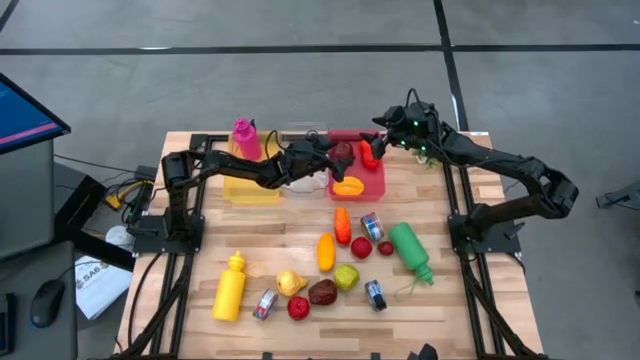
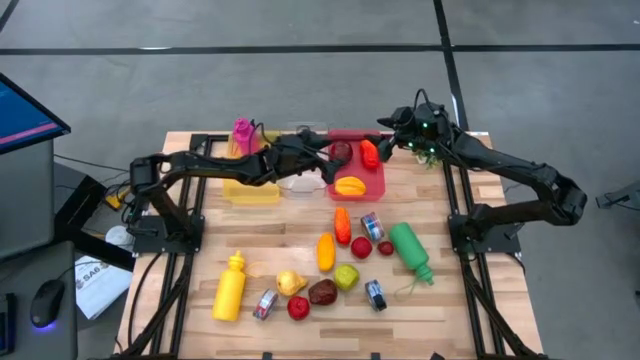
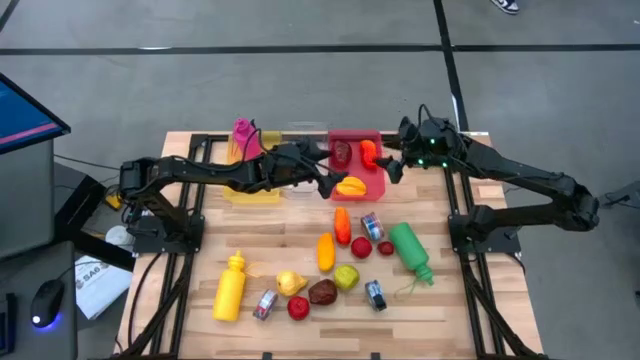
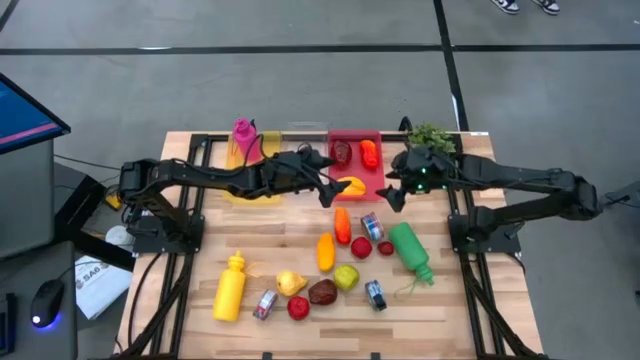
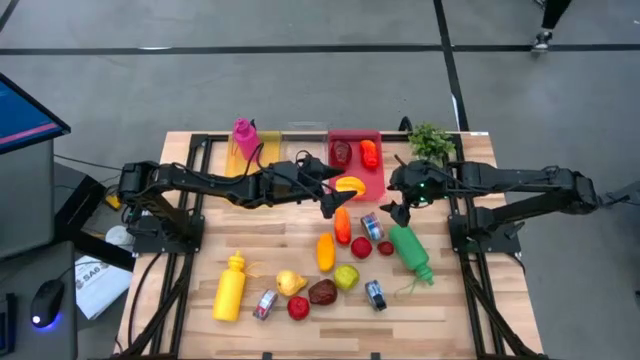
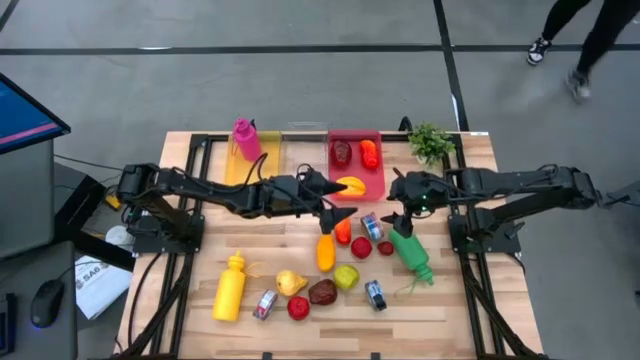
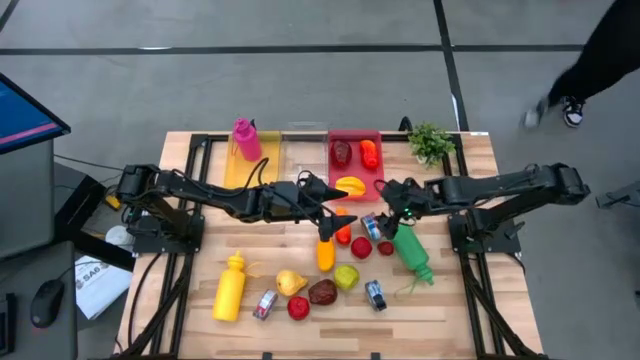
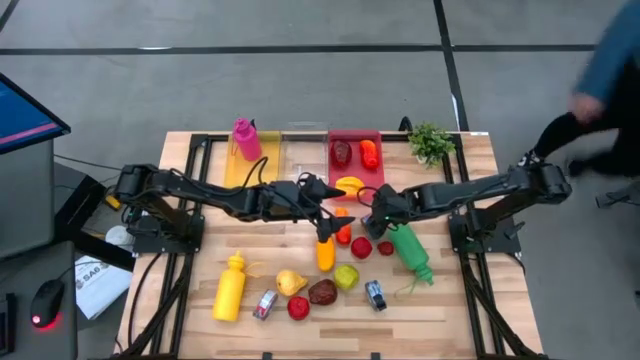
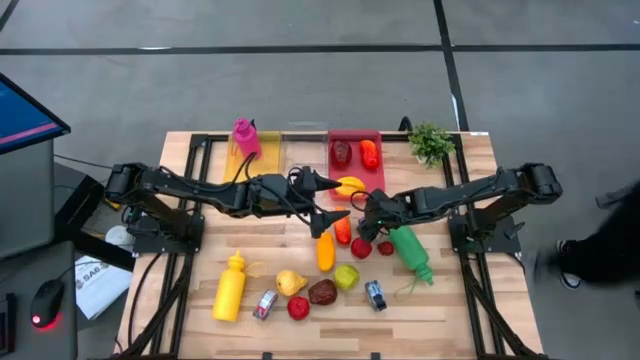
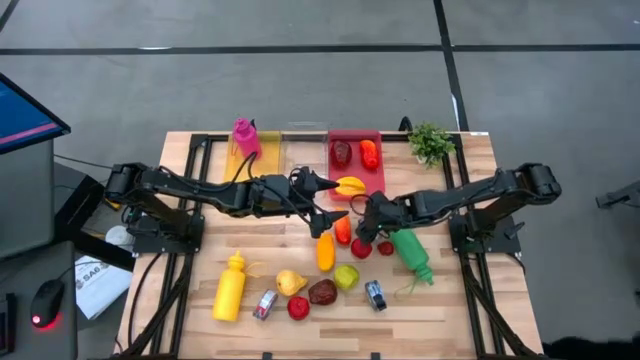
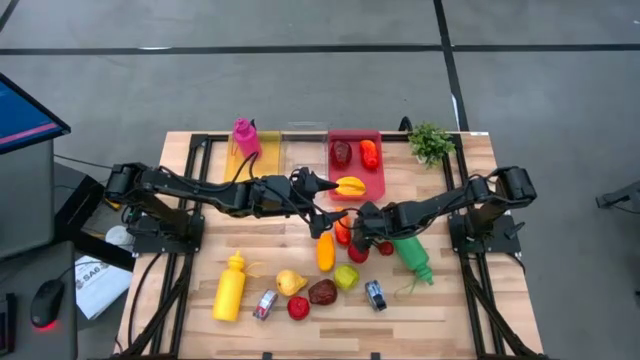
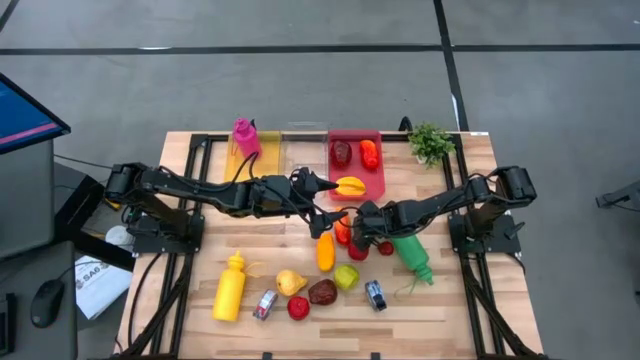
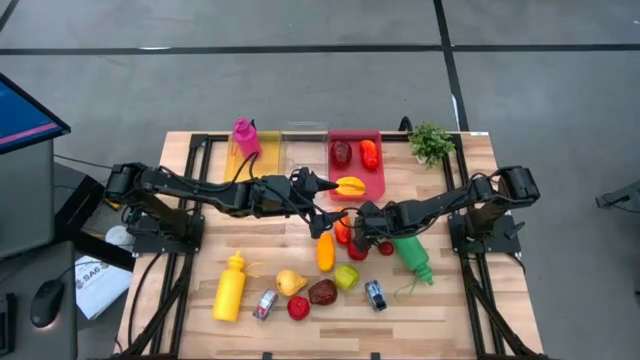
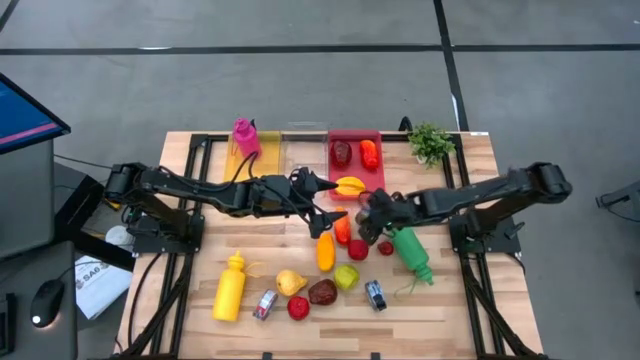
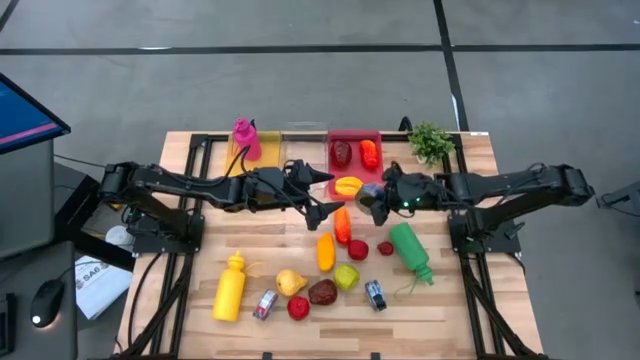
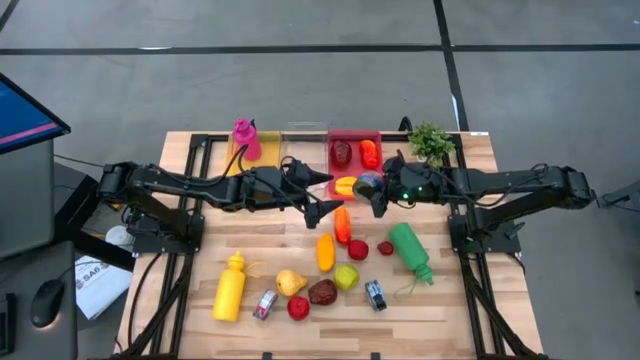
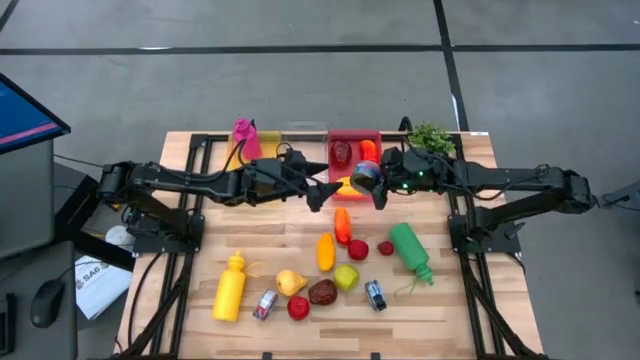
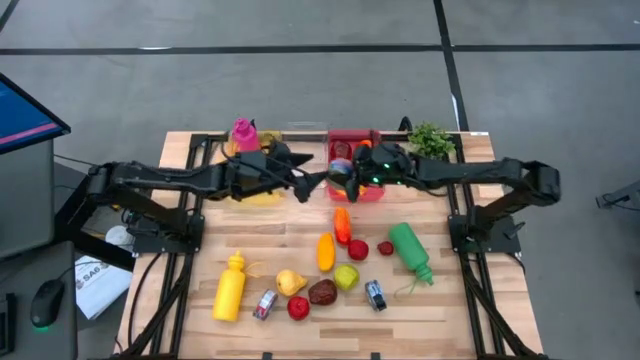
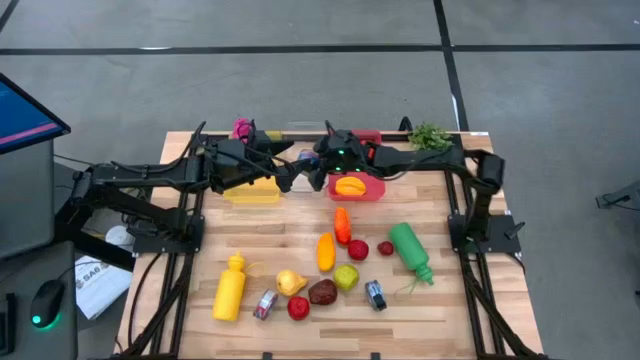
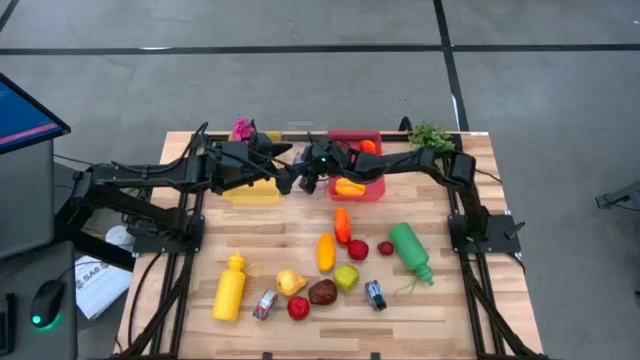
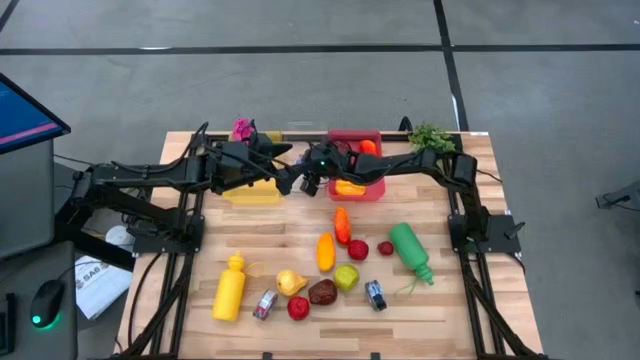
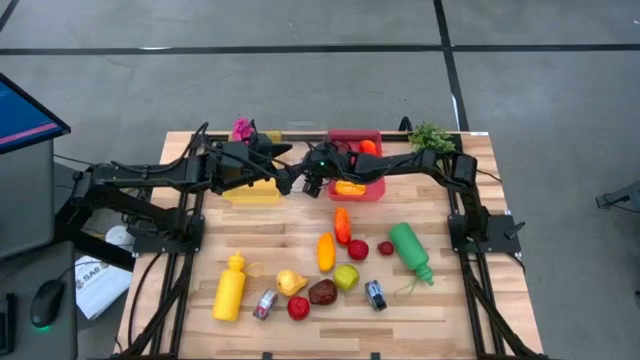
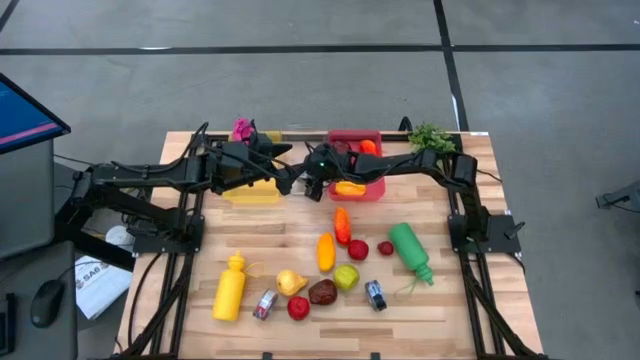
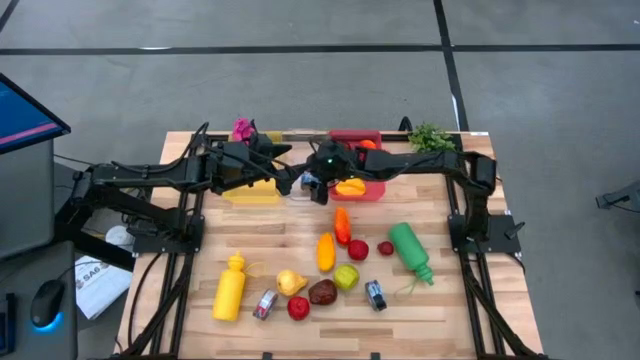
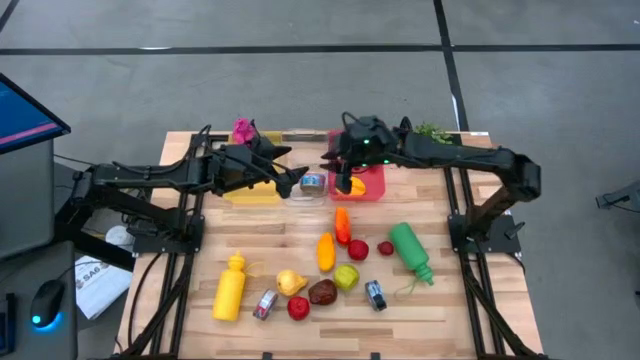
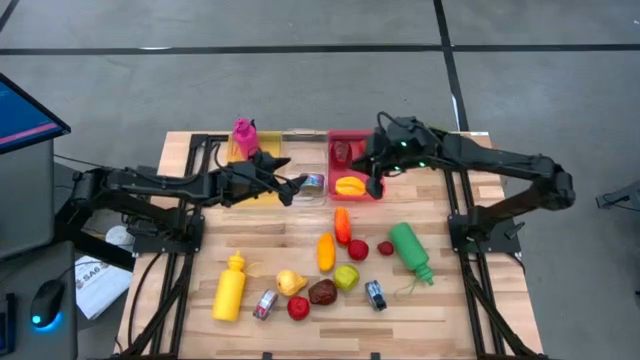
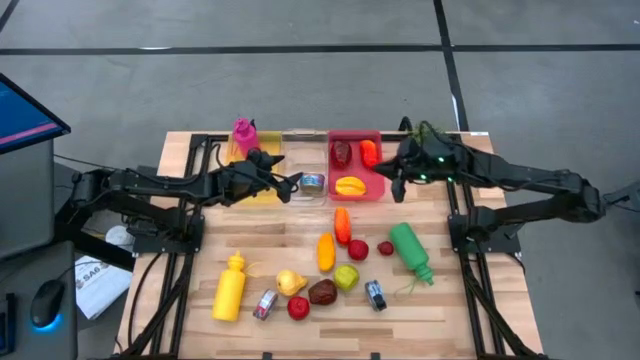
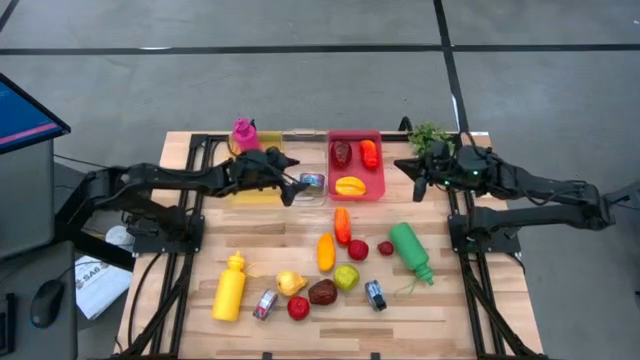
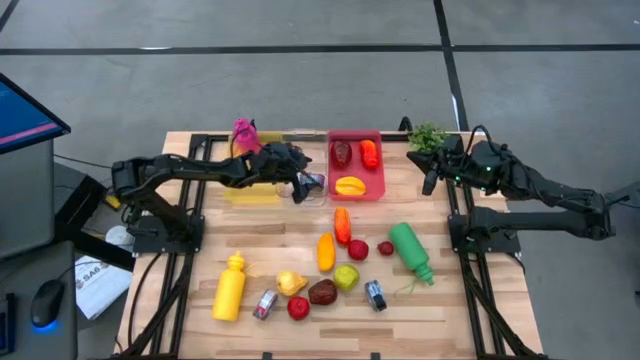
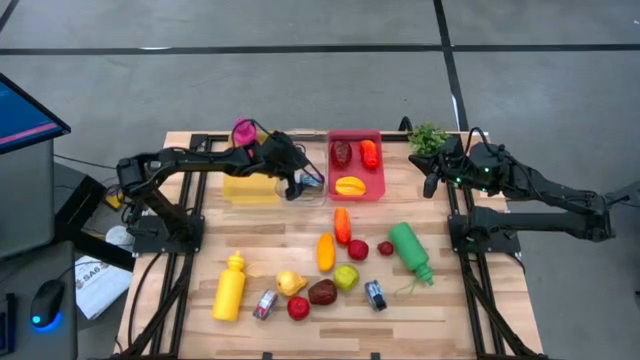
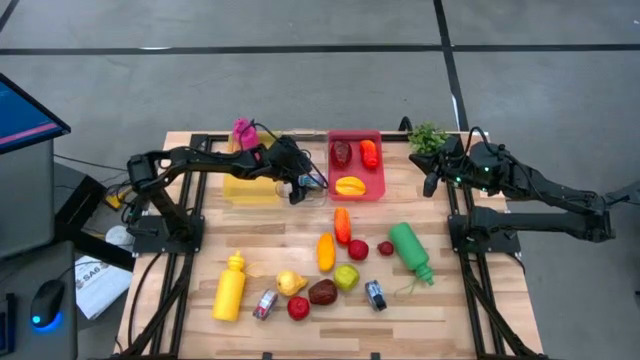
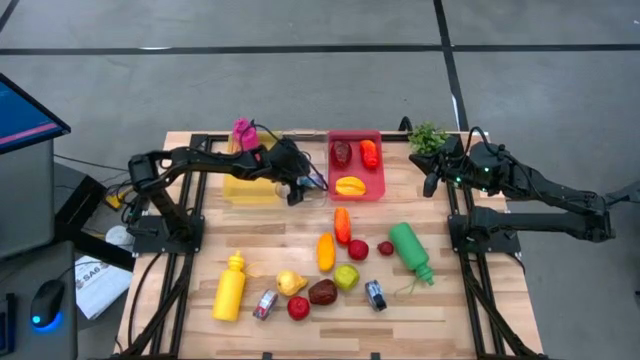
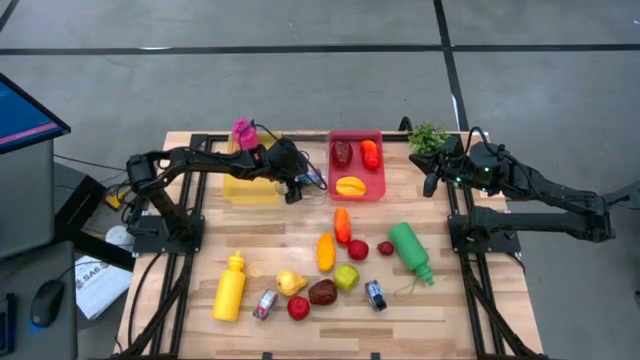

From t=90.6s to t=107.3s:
Task: Pick & Place Food Item
Put the blue pink tuna can into the transparent bin

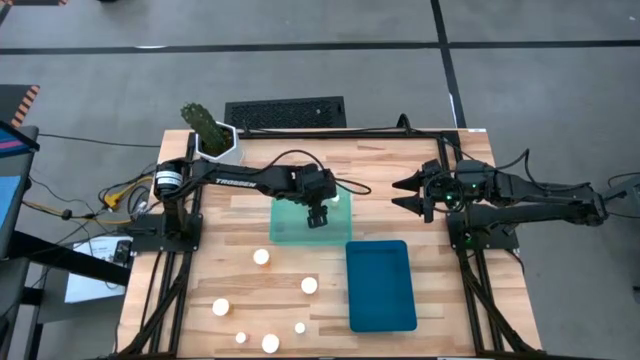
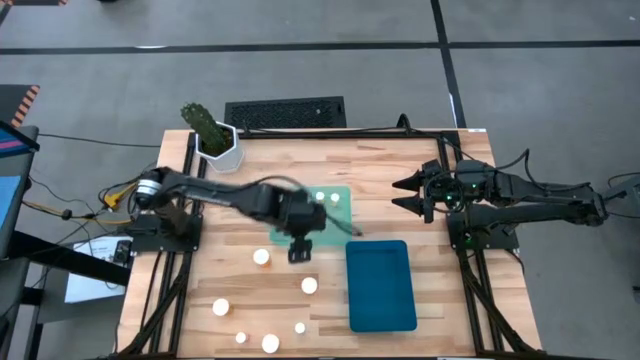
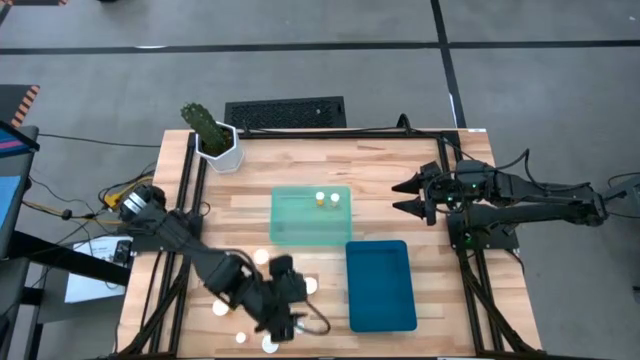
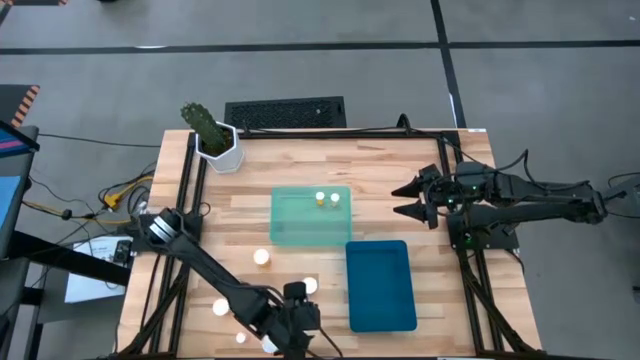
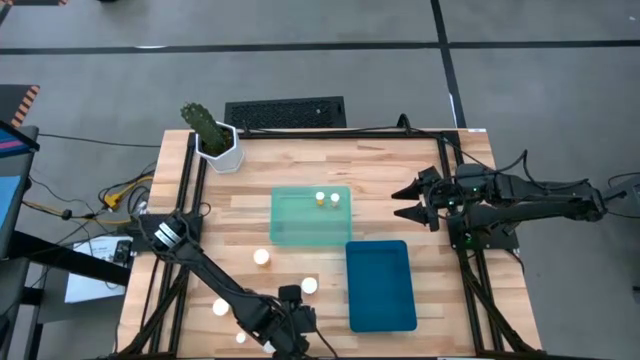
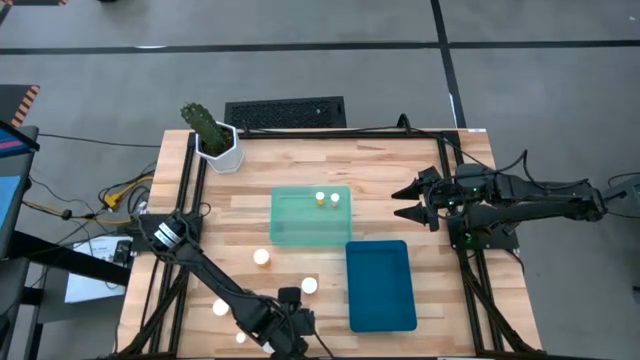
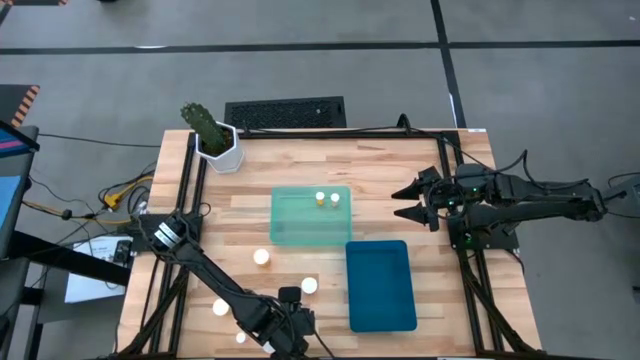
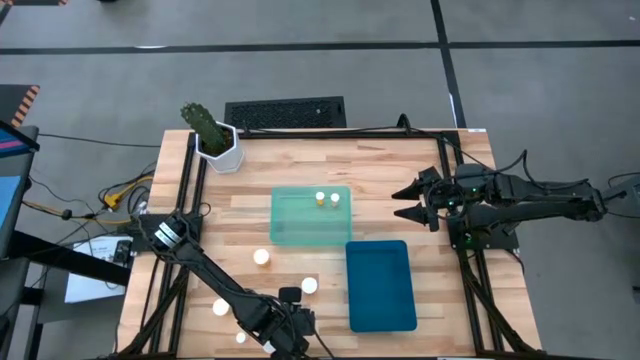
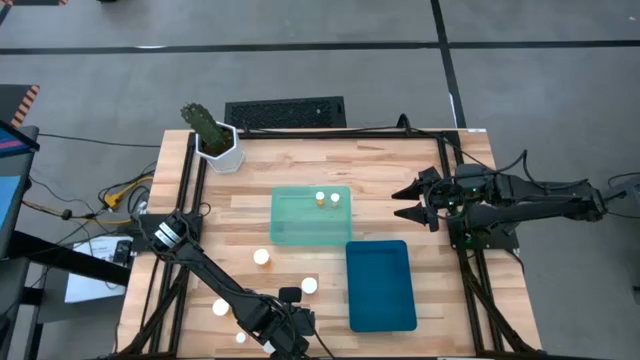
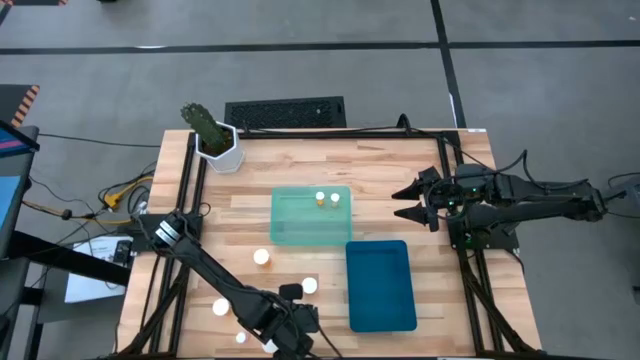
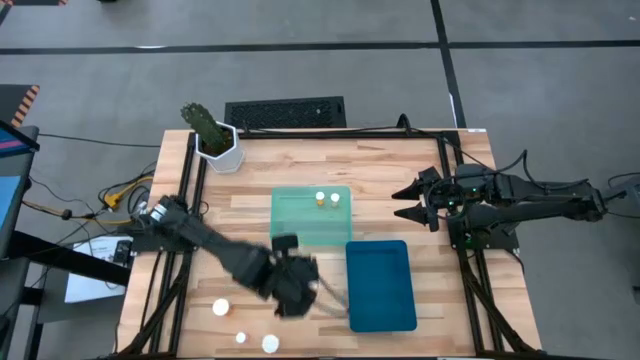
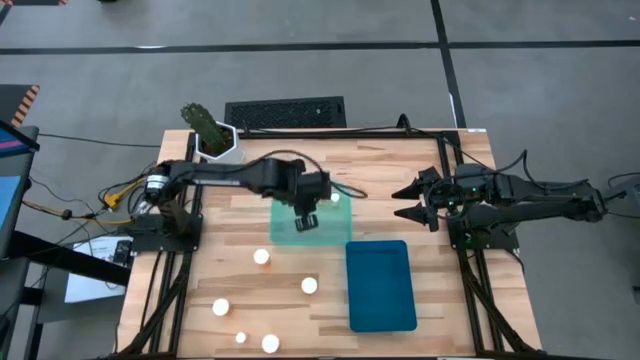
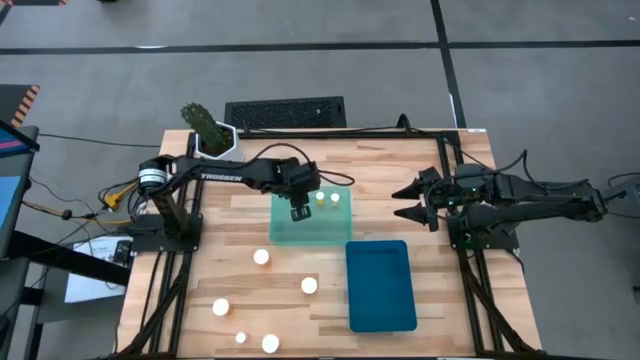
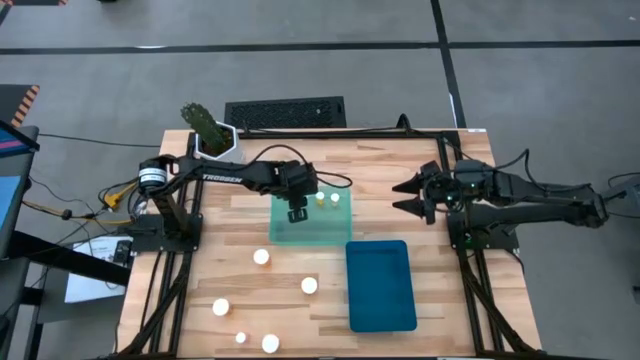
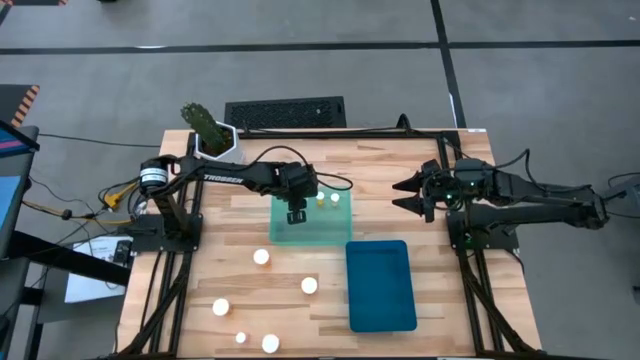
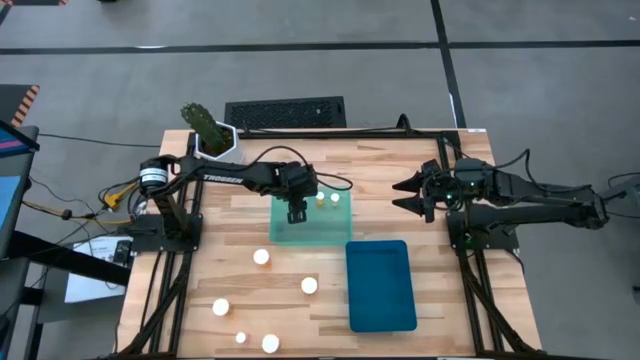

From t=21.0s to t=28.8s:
Task: Pick and place medicine bottles into bin by pill shape (circle, oval)
Put the blue pill bottle into the light blue bin
